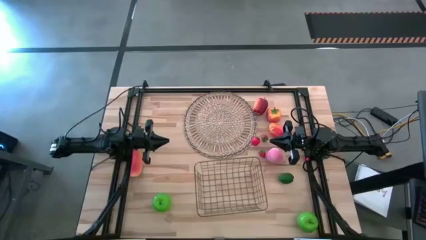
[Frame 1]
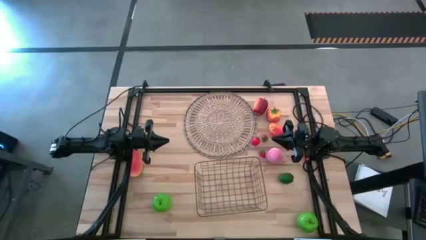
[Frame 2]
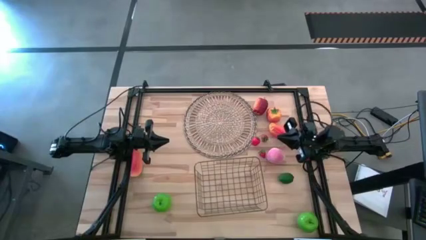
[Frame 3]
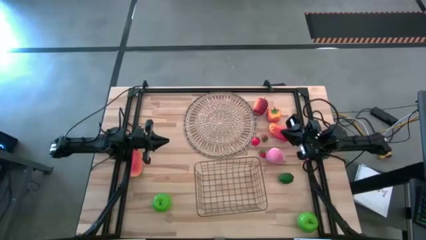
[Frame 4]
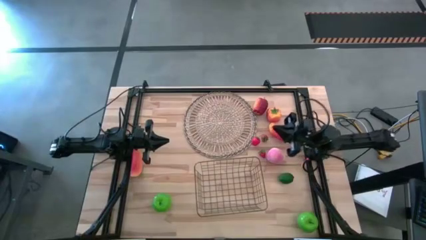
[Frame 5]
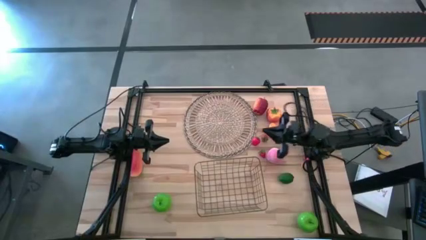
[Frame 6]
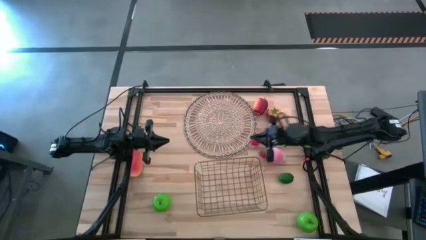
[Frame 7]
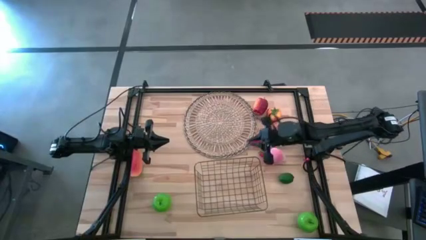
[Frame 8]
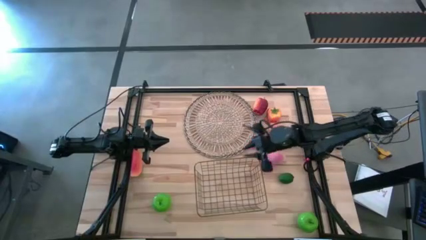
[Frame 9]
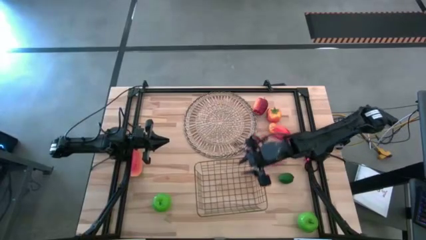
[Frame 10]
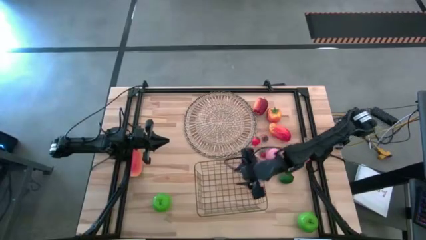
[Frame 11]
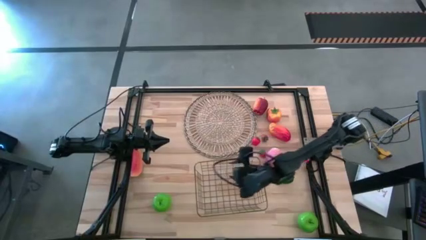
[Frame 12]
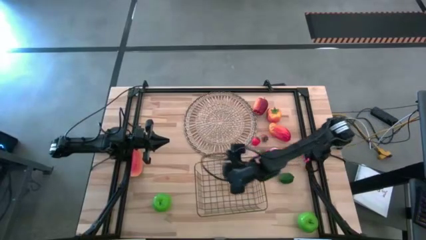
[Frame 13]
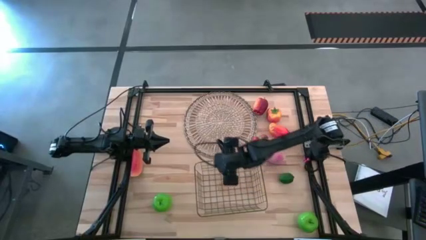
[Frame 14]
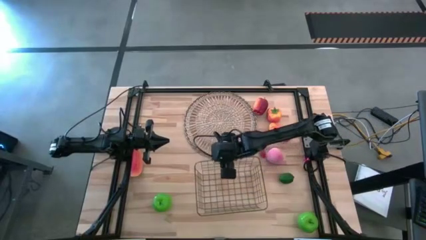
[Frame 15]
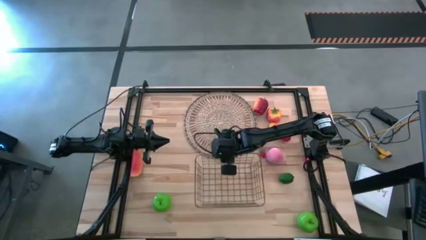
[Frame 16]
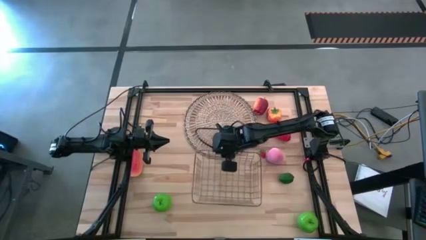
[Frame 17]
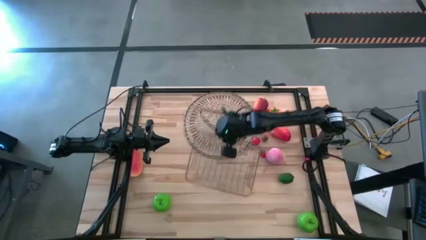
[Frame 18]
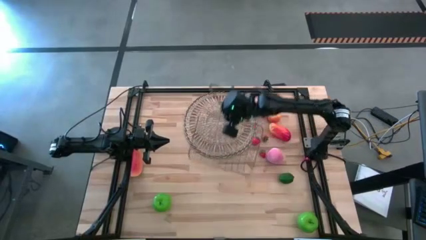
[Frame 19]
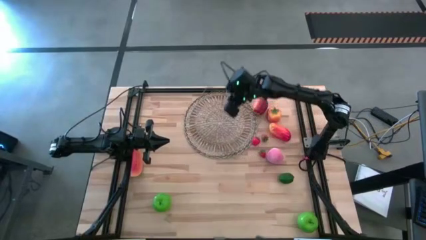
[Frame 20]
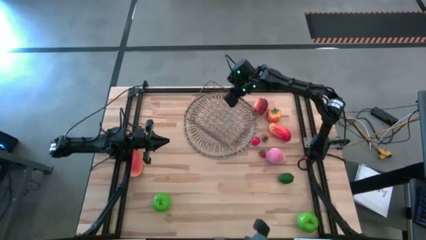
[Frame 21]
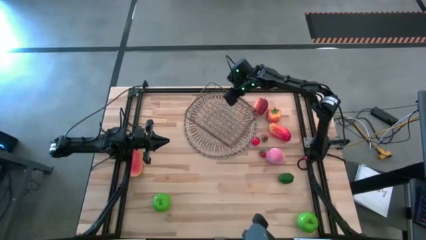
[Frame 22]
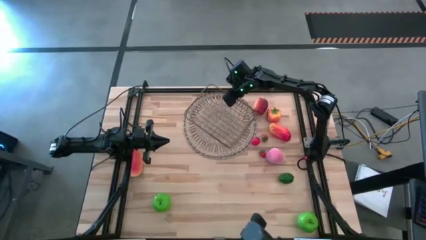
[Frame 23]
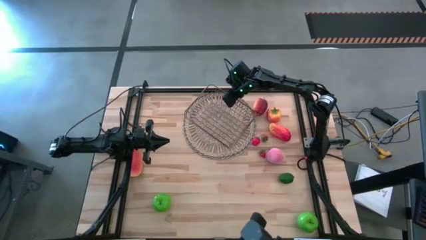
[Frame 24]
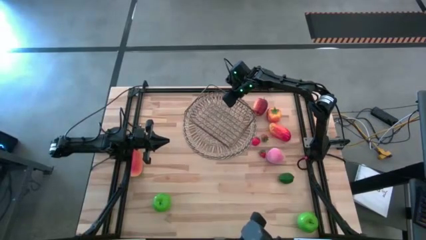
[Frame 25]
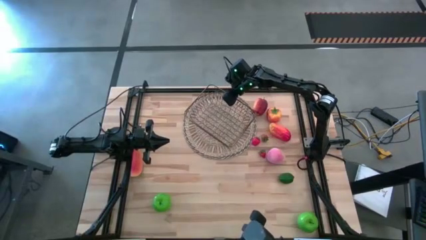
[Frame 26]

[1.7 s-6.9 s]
Task: Build produce basket
Put the gold wire basket on the brown placemat

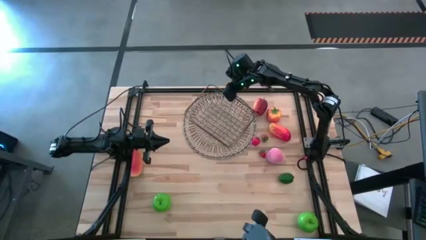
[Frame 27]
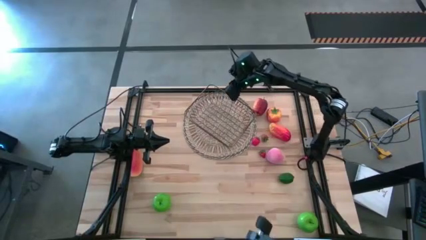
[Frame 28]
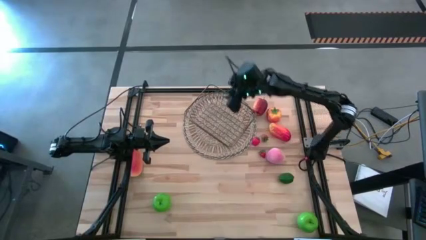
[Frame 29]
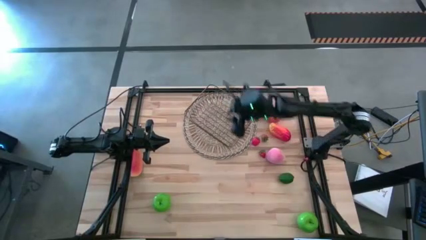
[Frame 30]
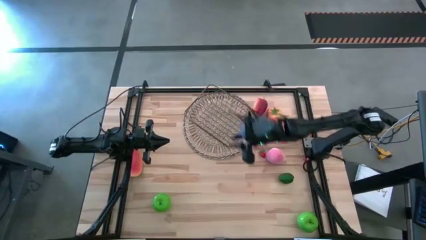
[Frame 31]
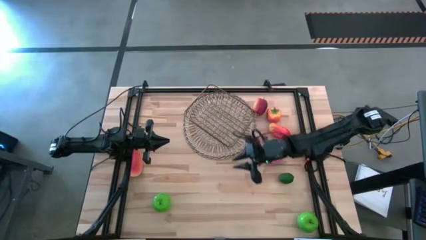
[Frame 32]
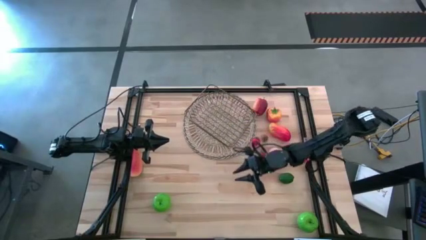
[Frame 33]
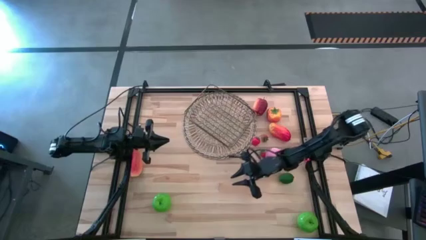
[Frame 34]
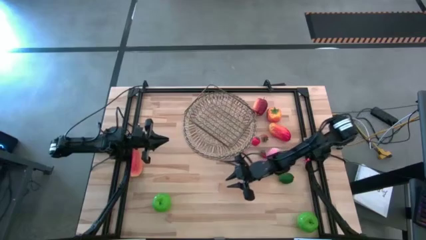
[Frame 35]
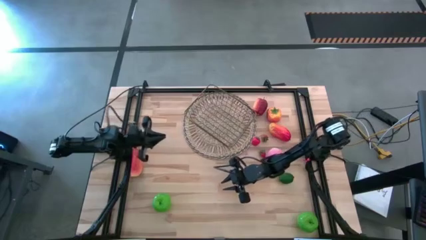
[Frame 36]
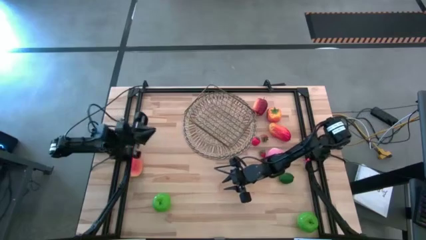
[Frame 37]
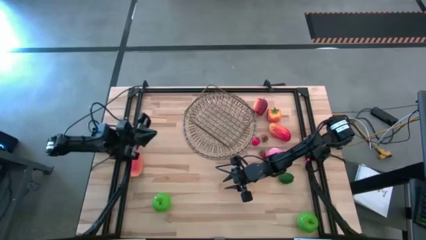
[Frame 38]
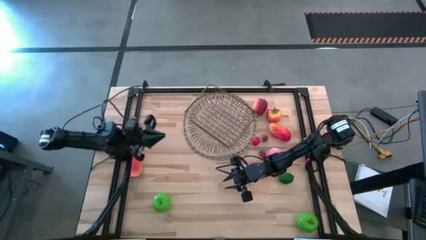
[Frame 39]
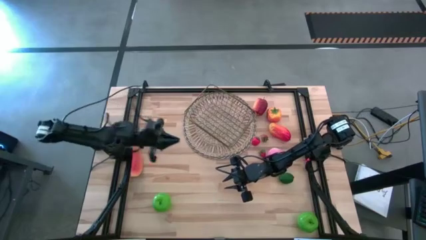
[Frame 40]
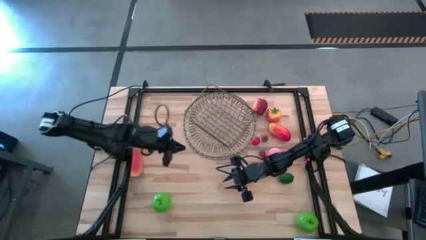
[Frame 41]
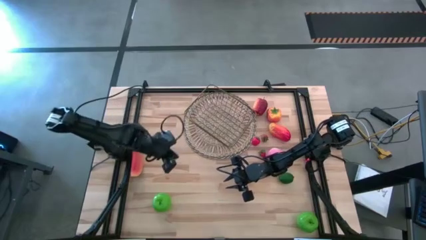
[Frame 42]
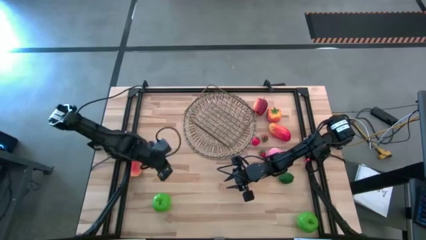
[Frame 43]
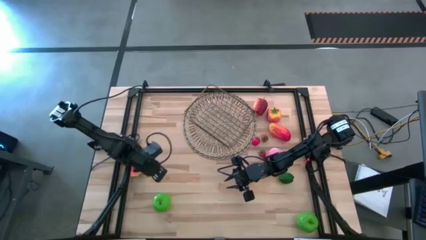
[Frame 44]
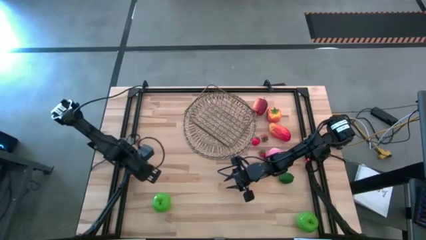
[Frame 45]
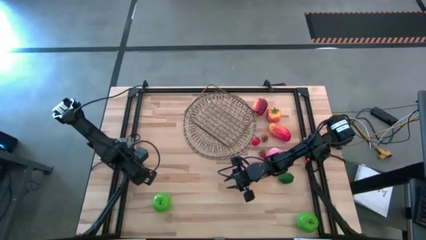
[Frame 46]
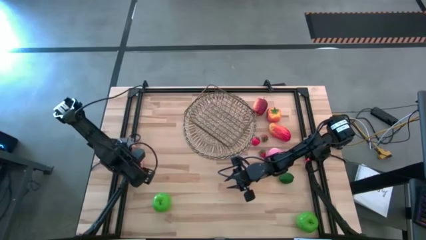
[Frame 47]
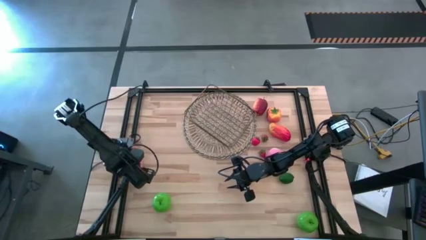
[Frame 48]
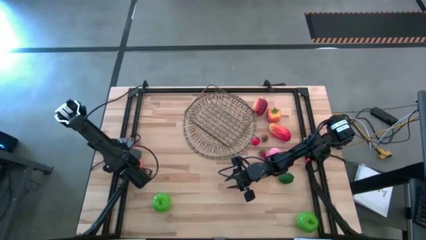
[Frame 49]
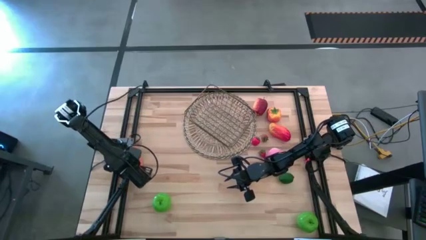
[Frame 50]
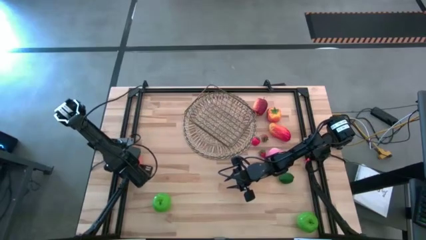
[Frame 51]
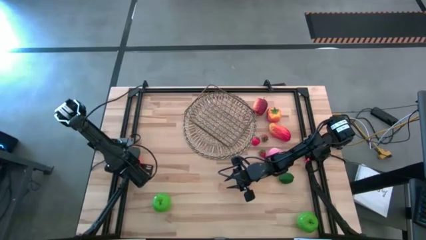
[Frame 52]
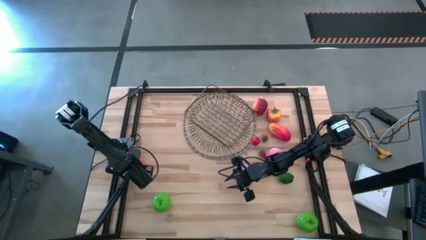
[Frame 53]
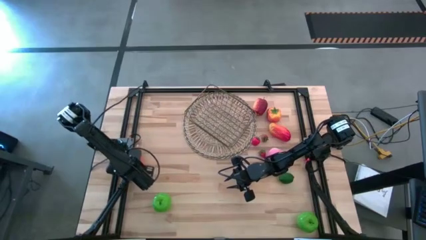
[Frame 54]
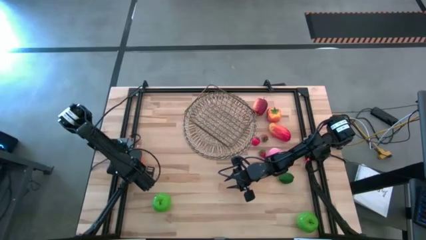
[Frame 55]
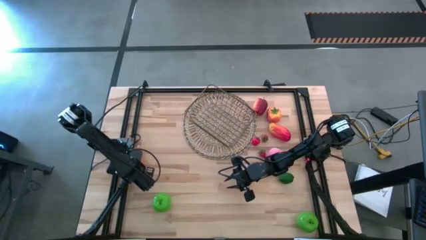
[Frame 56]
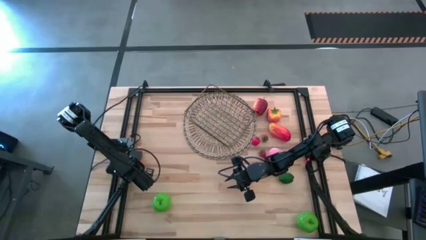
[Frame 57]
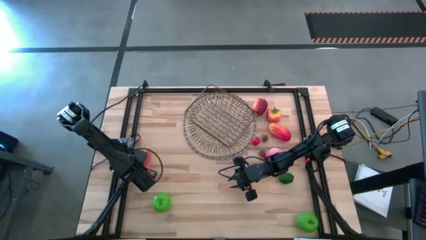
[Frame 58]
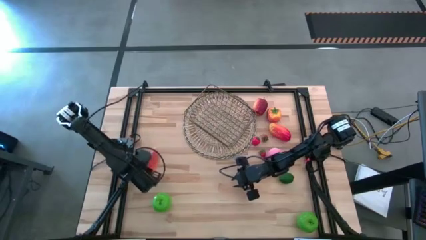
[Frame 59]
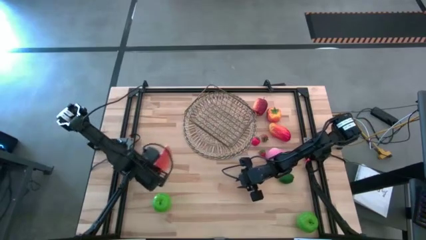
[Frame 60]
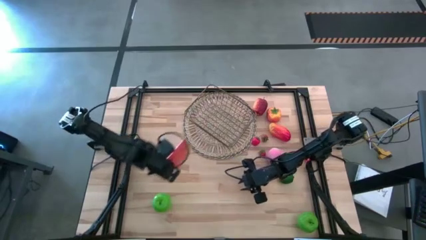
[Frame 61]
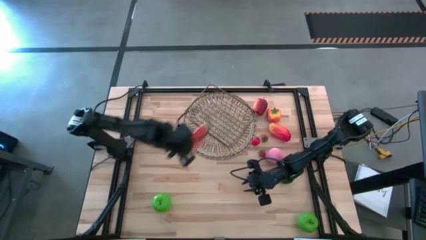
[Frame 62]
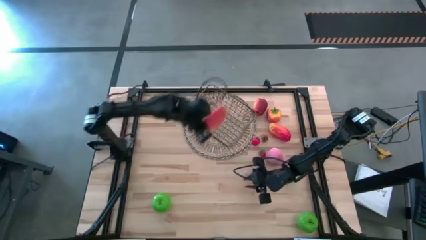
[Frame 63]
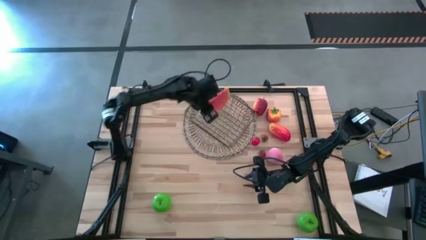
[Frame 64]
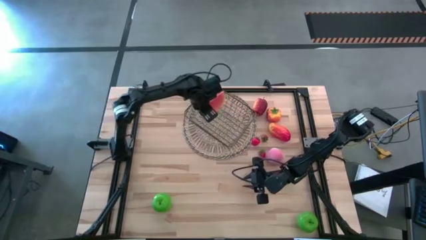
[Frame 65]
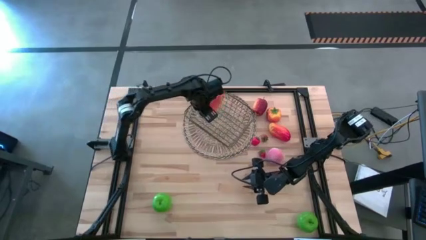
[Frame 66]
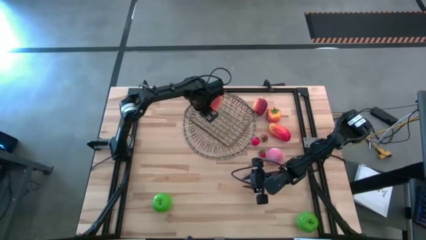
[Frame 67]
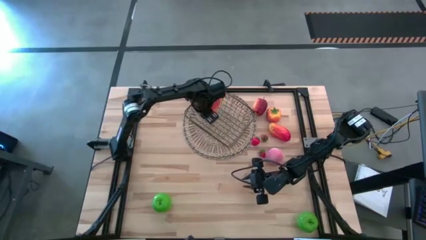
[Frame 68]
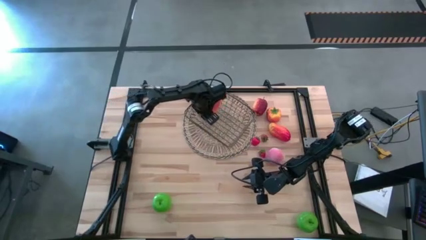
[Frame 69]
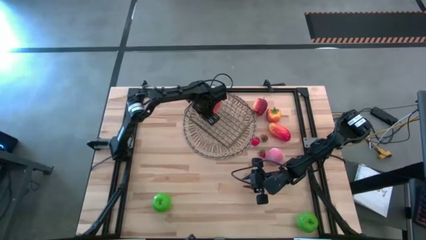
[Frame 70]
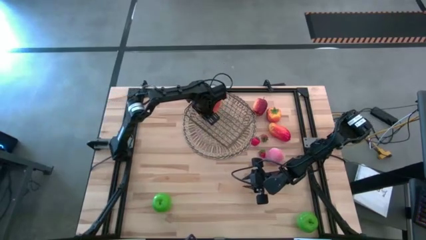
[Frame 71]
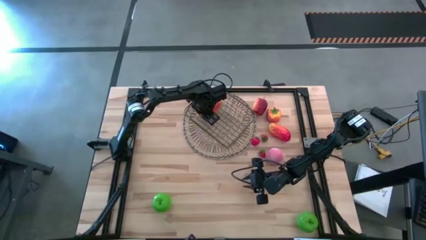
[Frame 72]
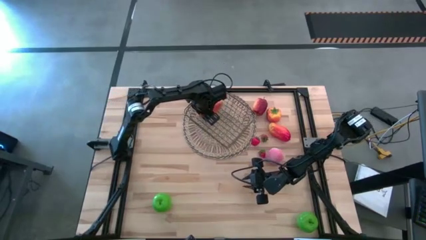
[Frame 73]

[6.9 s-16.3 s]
Put the watermelon into the gold wire basket

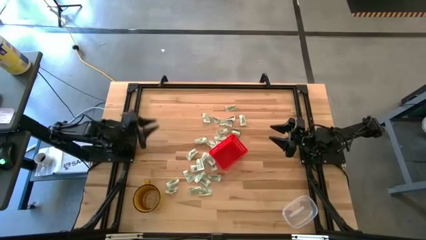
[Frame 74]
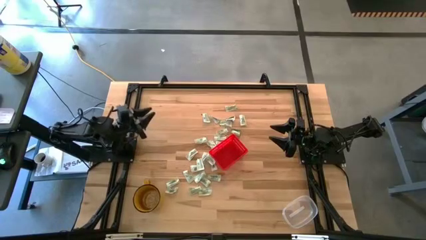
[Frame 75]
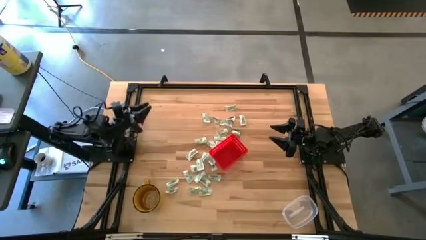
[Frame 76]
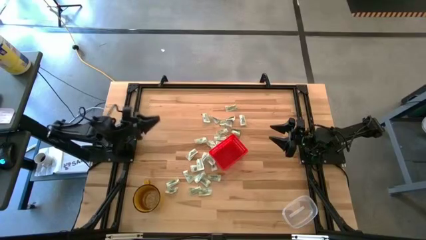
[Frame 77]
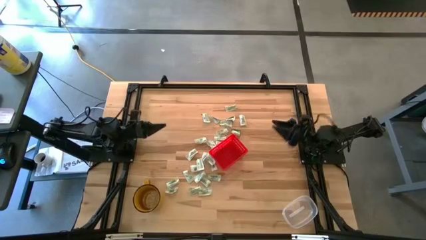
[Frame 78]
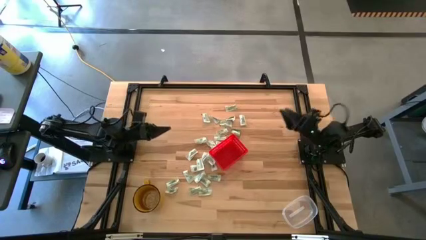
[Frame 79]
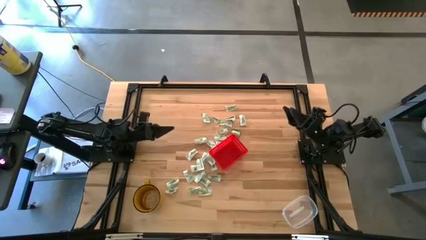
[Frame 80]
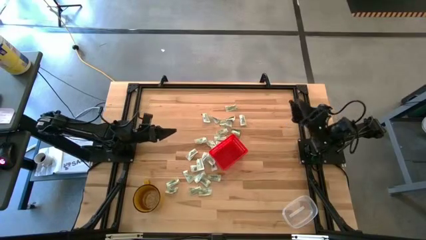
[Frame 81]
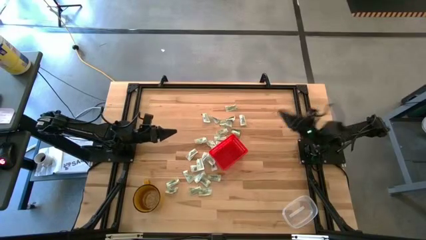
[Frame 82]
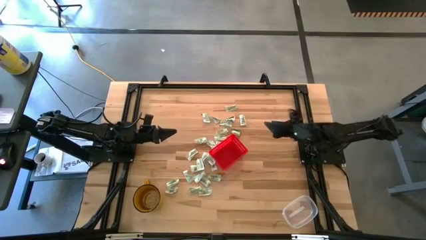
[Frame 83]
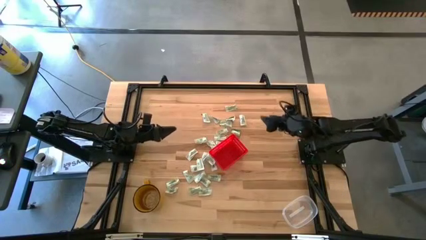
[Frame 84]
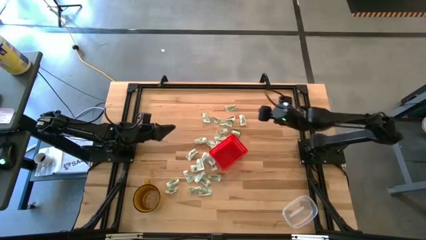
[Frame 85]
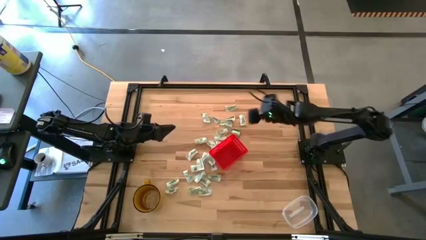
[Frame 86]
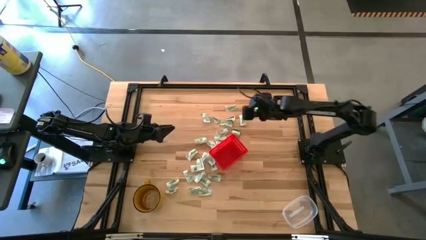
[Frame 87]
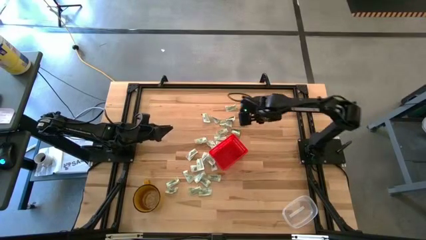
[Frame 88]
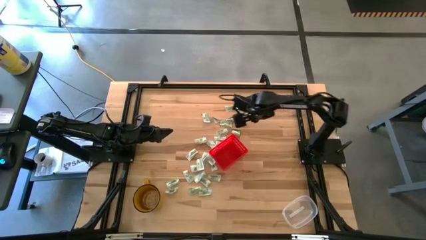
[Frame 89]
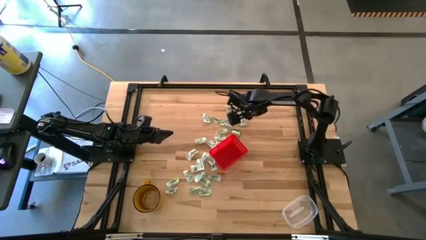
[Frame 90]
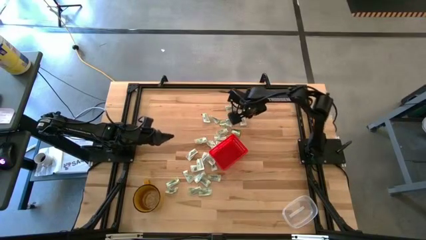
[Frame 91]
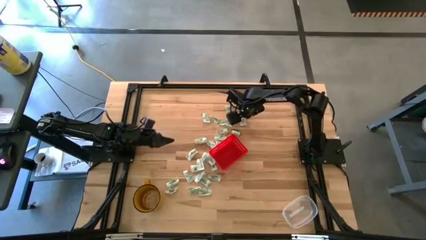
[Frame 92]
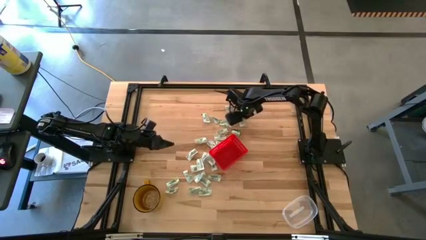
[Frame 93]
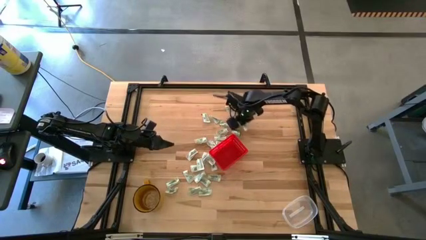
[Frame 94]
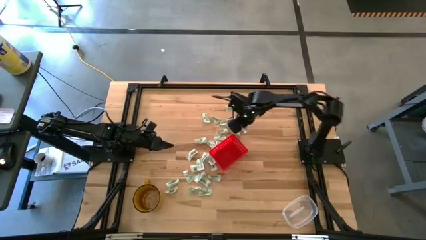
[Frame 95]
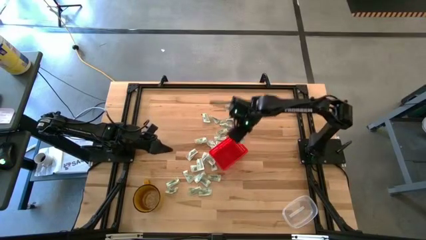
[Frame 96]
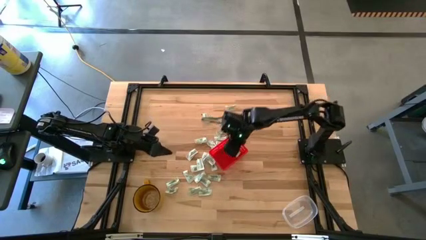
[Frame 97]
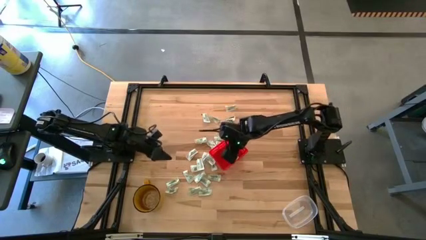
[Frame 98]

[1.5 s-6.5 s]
Task: Pick and place items into bin
Put the light green stevia packet into the red bin
